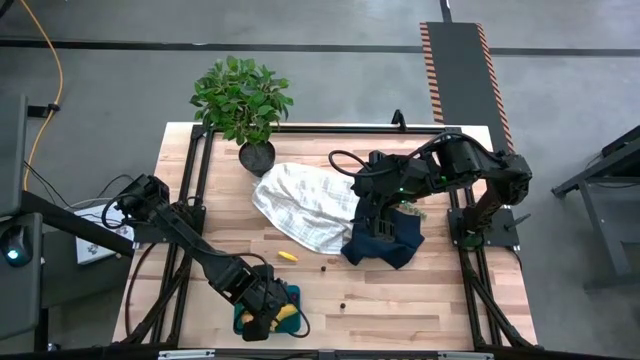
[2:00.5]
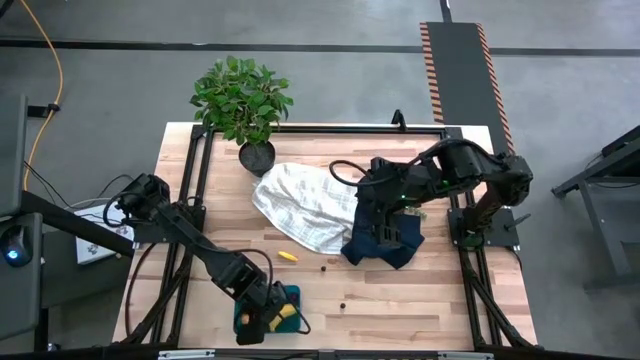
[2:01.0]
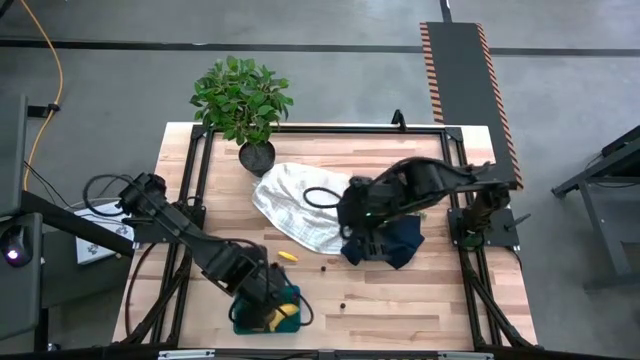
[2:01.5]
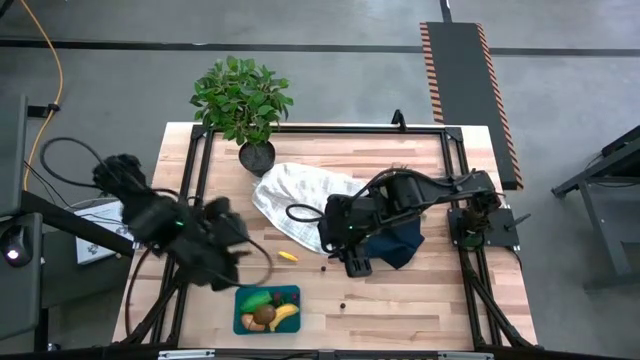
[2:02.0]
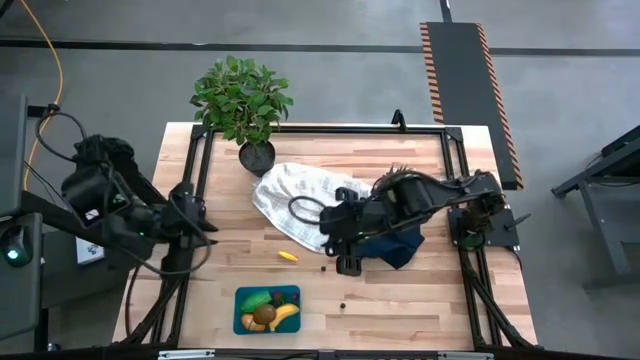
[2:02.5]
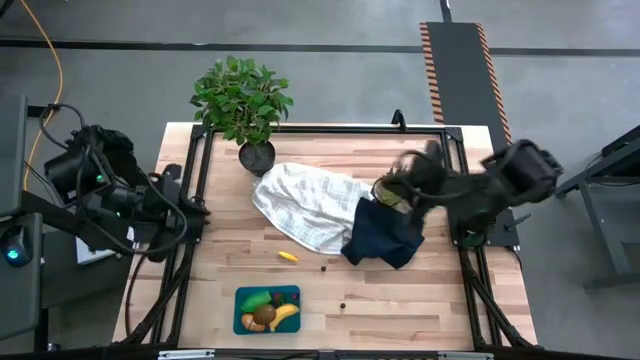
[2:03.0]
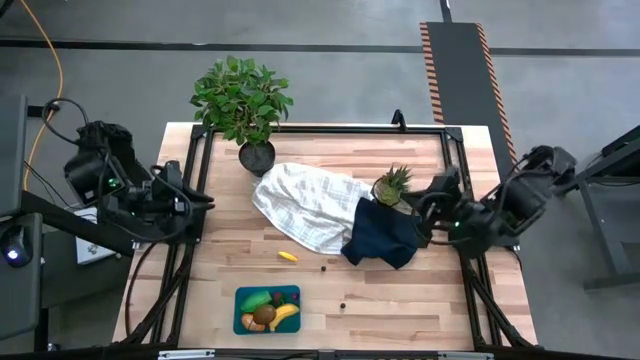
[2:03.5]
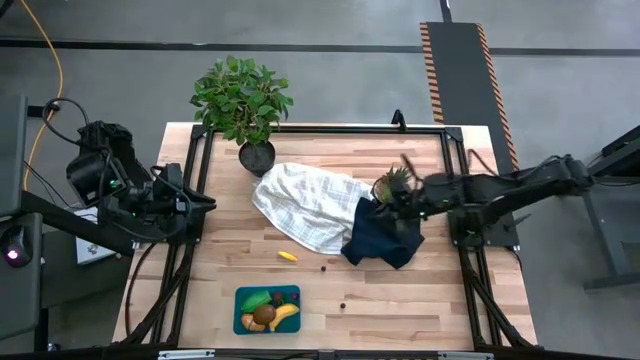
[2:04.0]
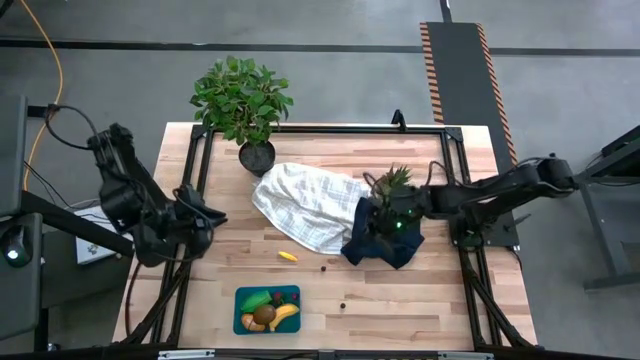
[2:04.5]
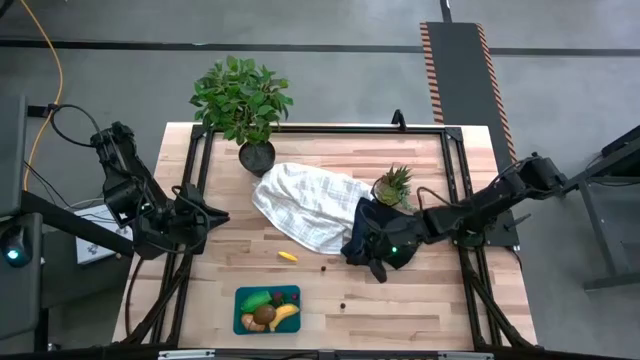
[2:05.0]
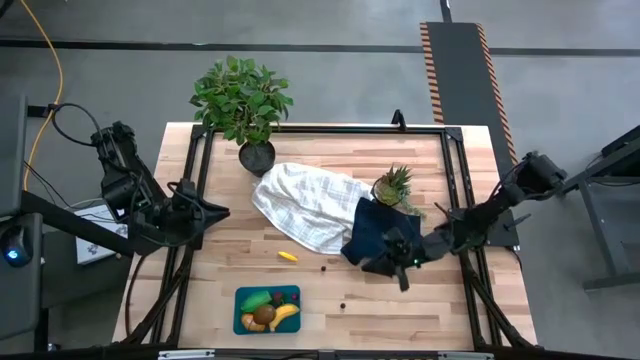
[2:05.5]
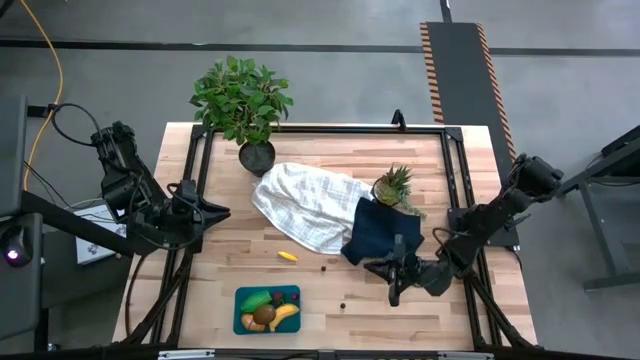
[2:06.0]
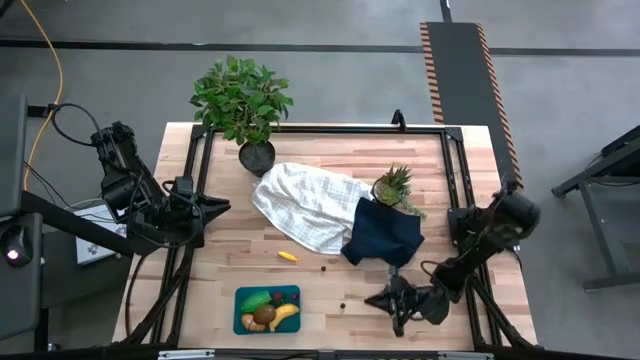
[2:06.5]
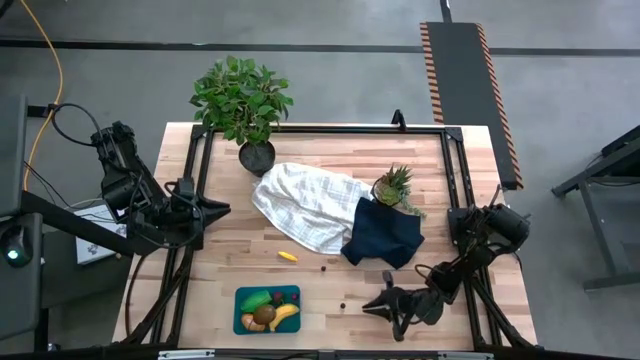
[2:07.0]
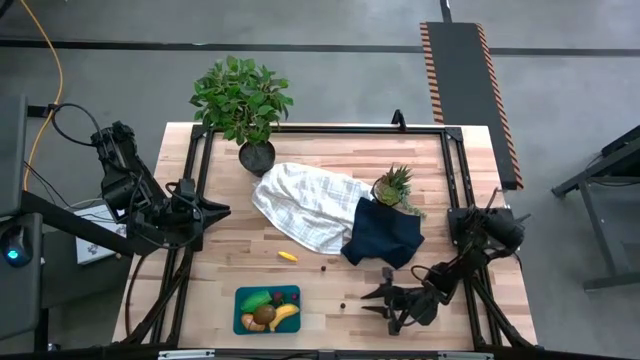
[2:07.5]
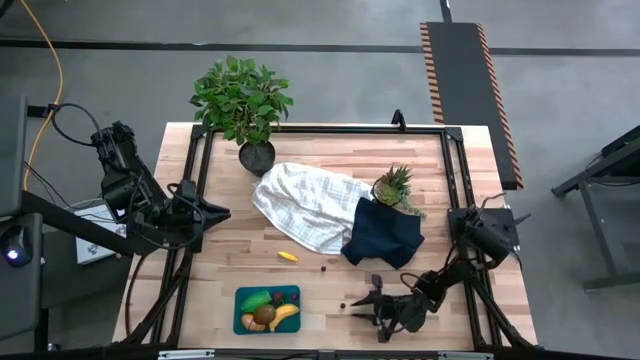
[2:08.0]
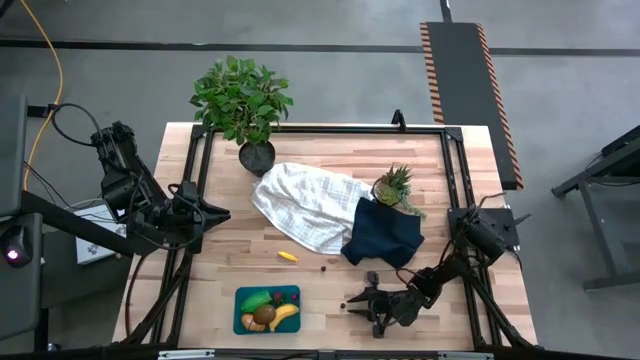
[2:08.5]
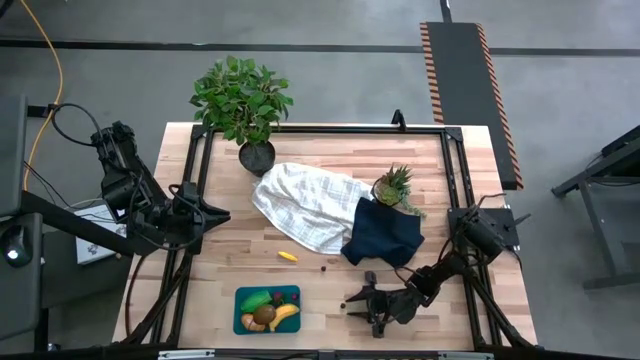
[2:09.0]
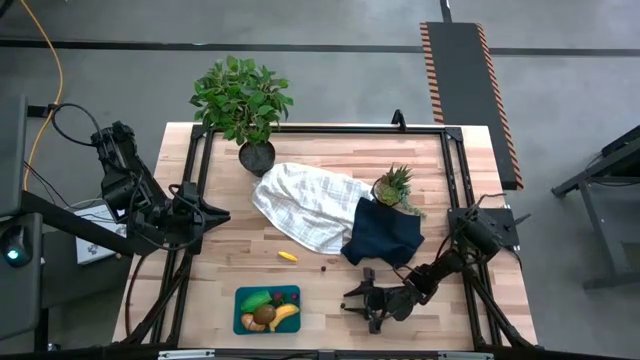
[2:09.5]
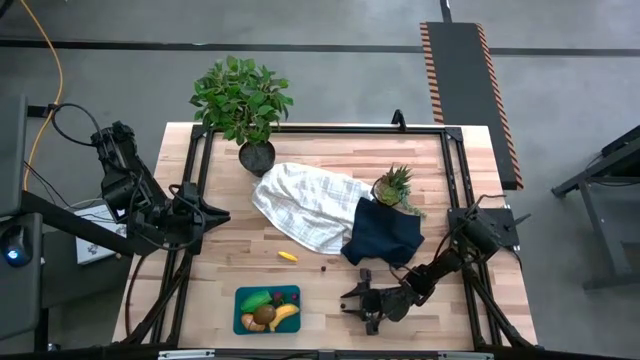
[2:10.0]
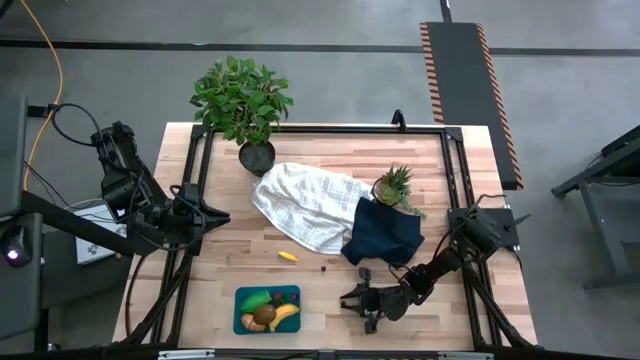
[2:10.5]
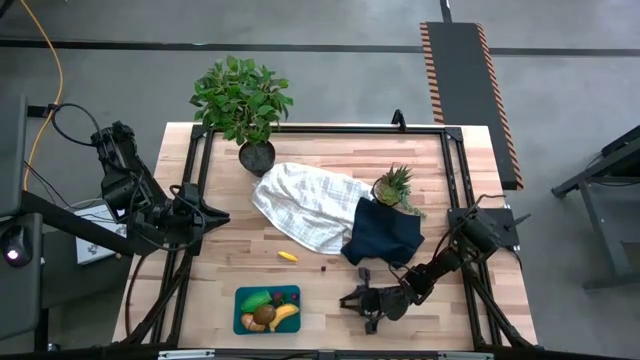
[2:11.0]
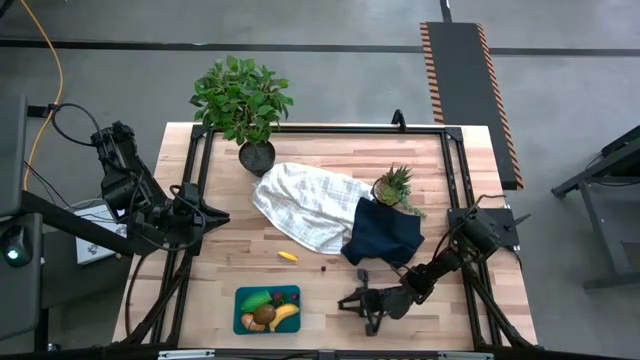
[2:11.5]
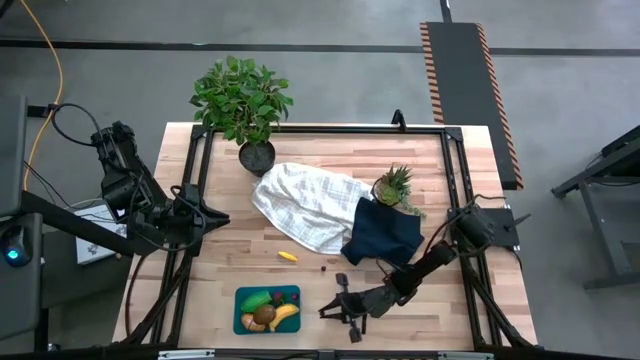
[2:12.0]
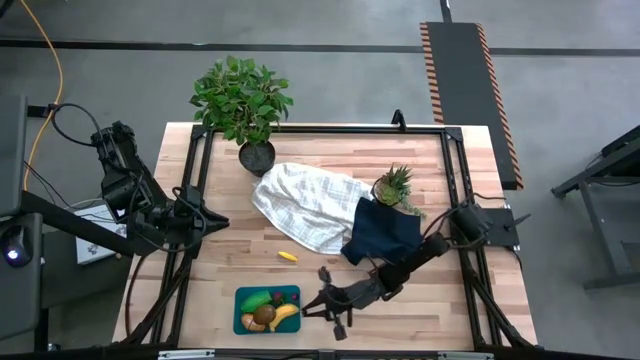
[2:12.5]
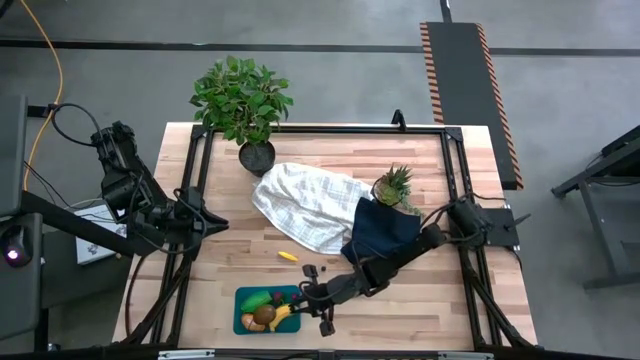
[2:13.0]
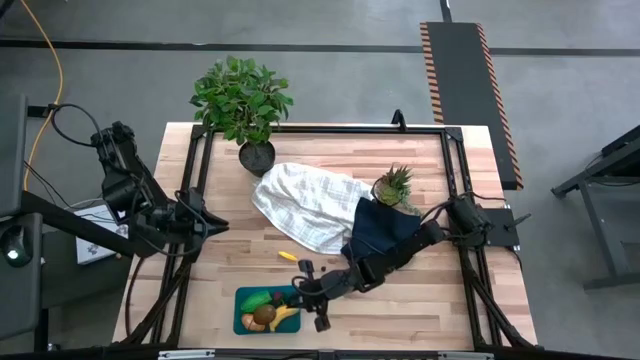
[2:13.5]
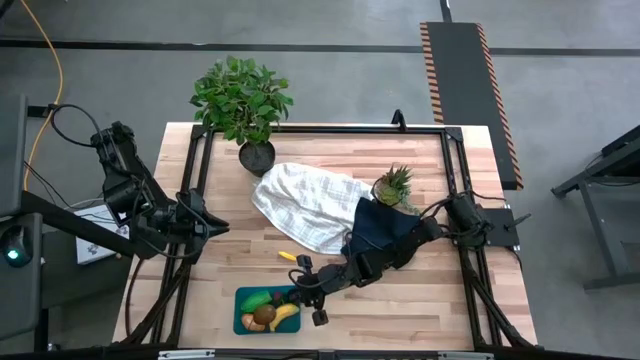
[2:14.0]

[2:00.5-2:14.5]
Task: Pick and placing Produce into tupperware
Put the bottom blueberry into the bin

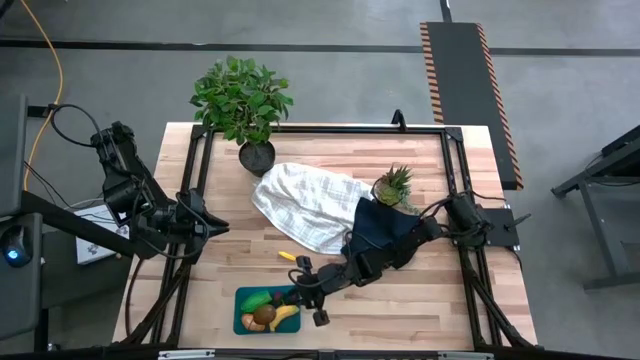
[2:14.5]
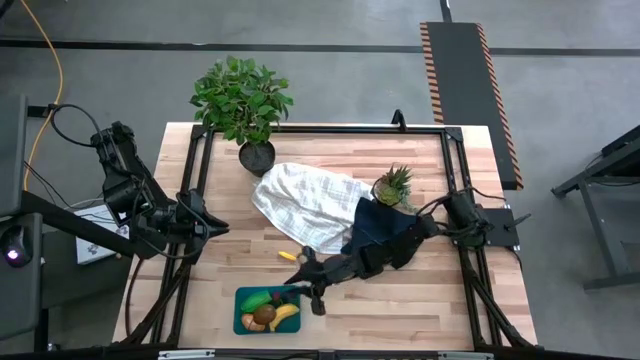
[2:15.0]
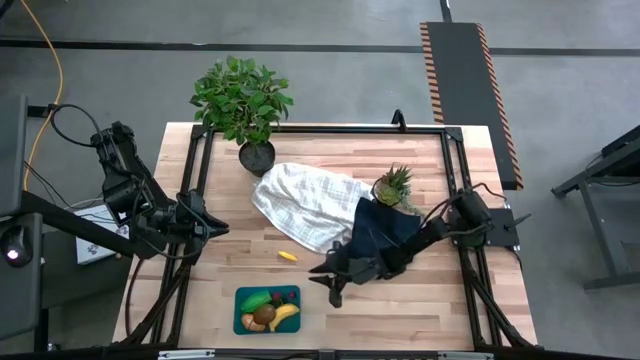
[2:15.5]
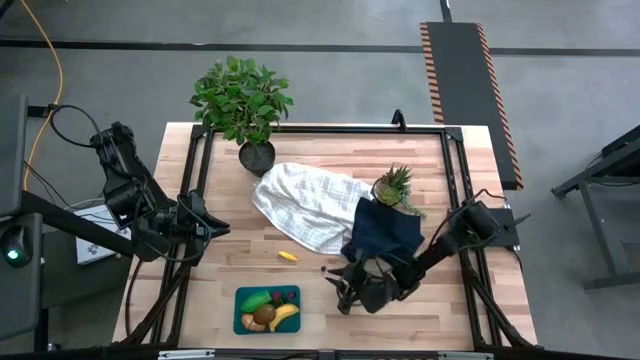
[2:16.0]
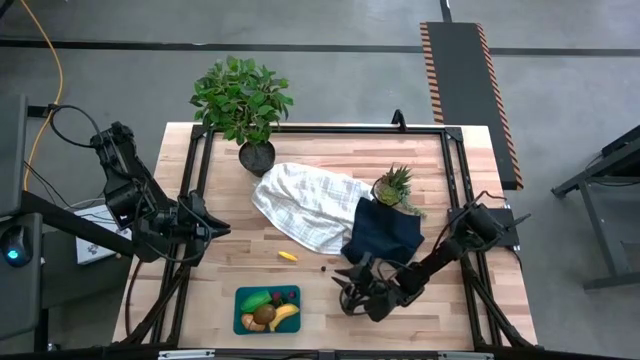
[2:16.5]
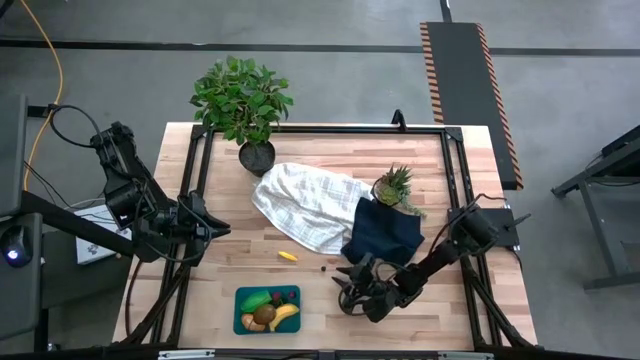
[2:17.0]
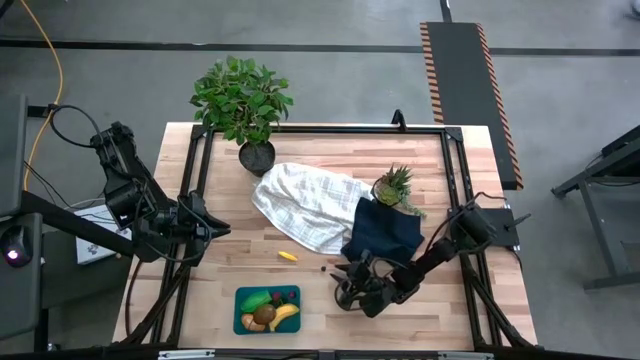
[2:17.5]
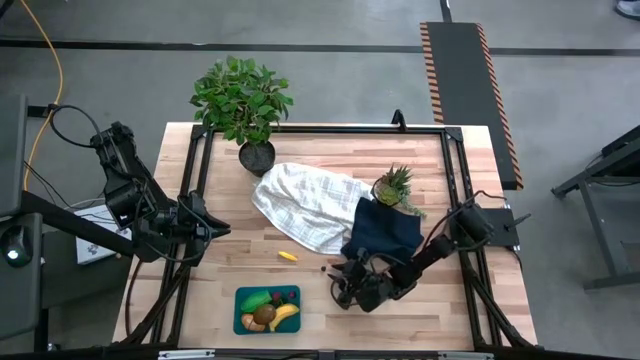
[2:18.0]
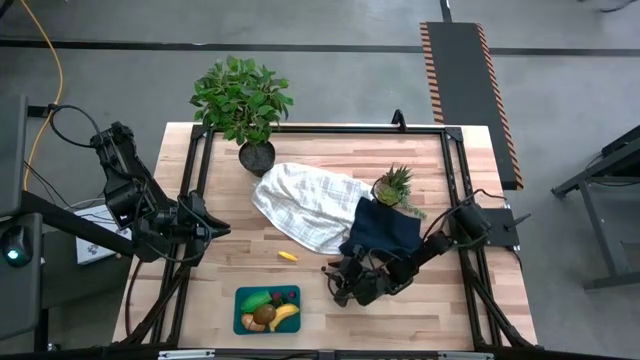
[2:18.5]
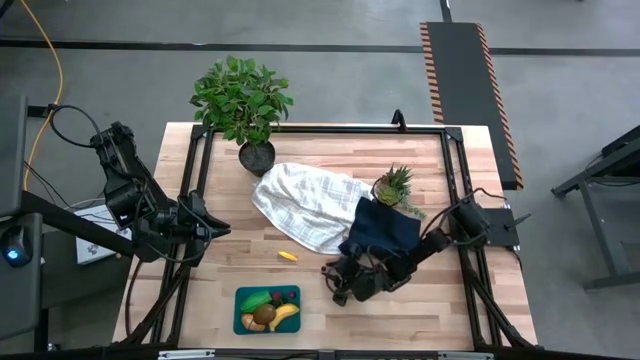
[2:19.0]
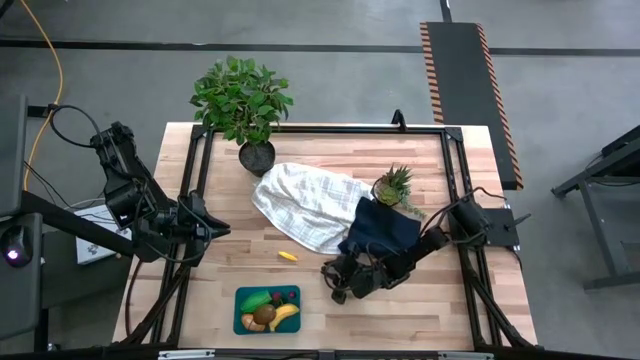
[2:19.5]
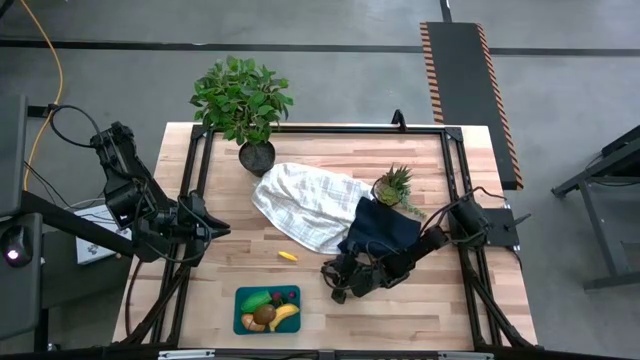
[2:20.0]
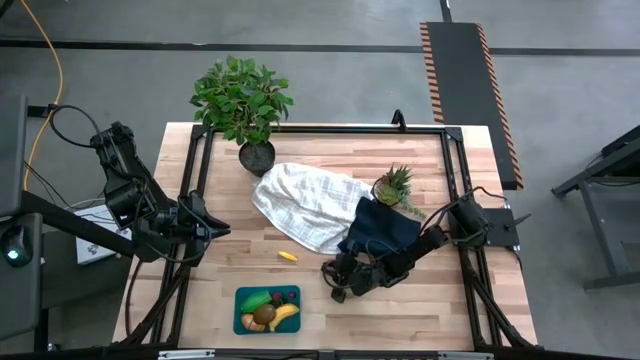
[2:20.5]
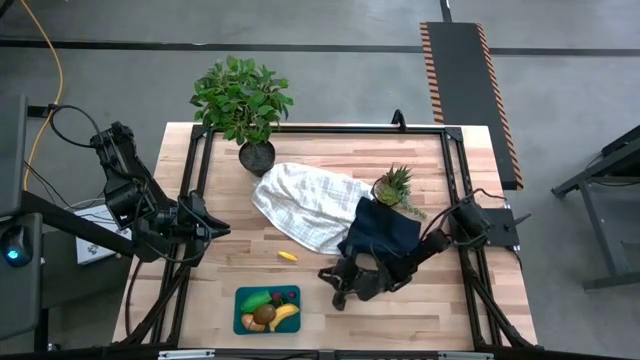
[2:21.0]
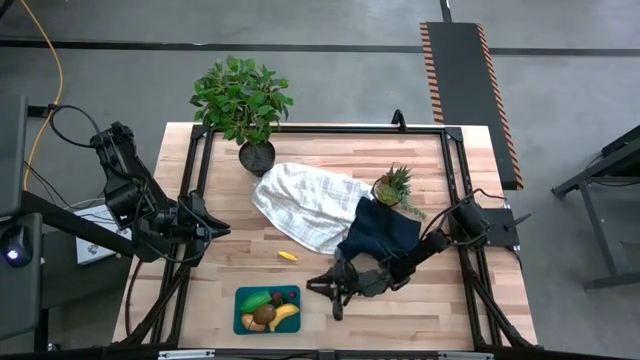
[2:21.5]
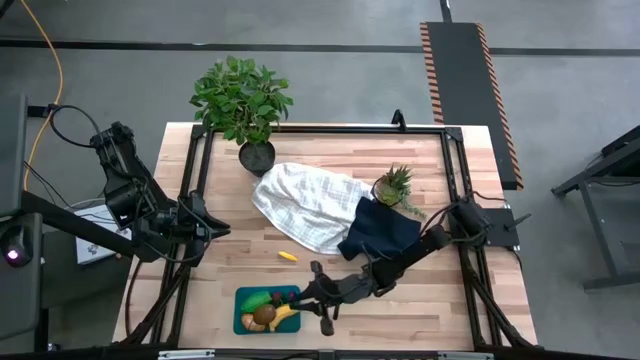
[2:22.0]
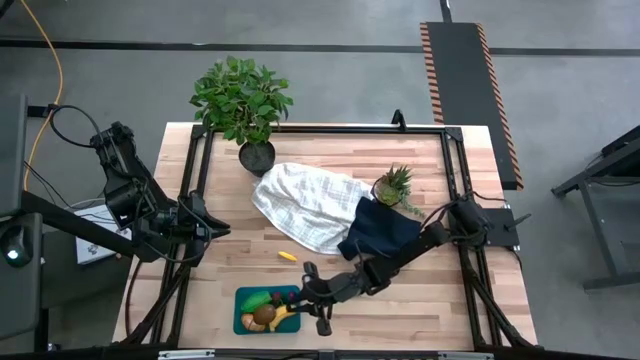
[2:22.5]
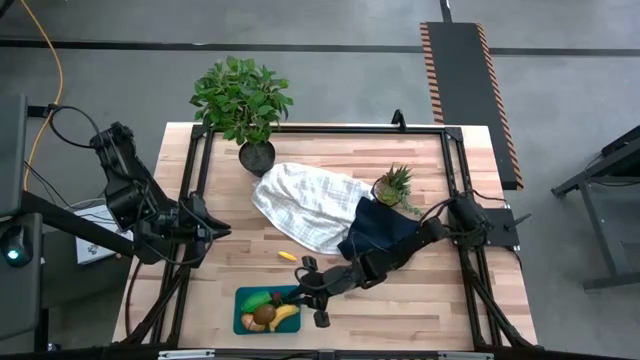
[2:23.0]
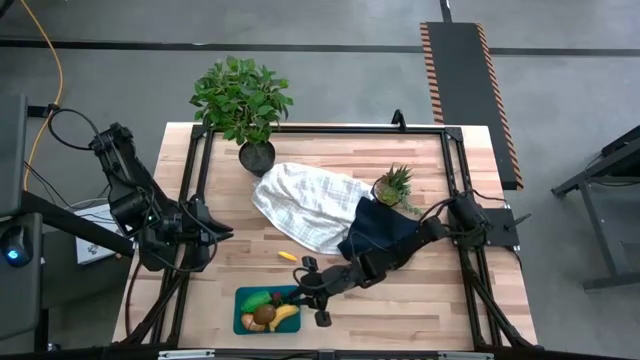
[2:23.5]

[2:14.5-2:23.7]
Put the blueberry into the bin
